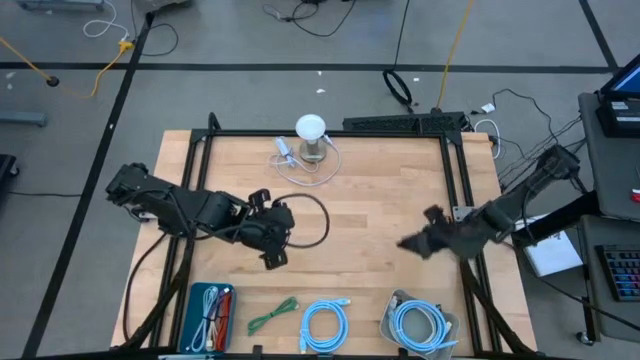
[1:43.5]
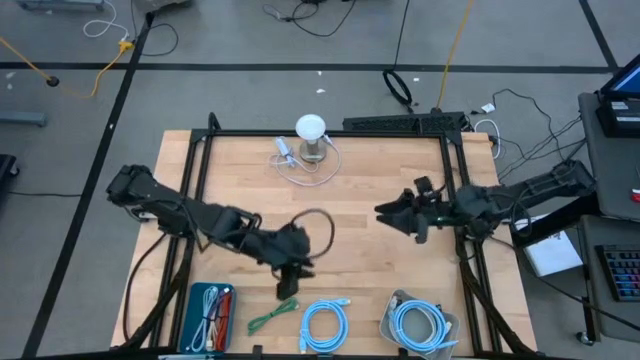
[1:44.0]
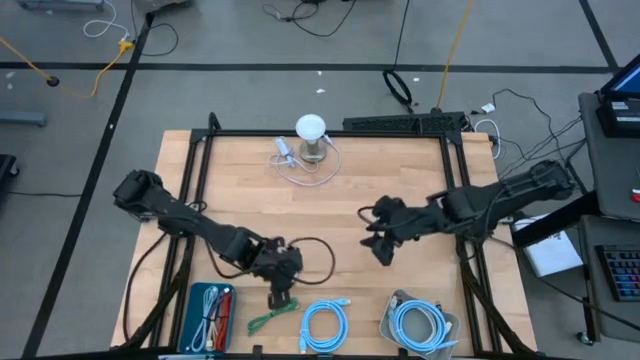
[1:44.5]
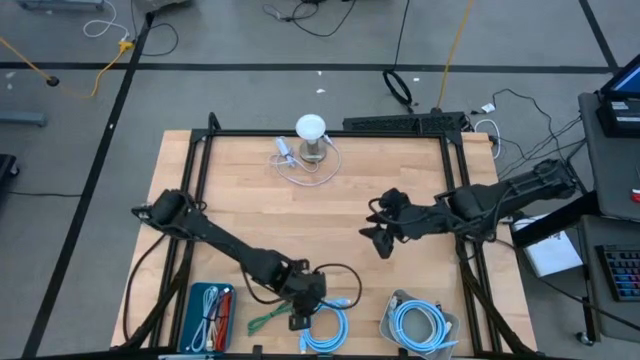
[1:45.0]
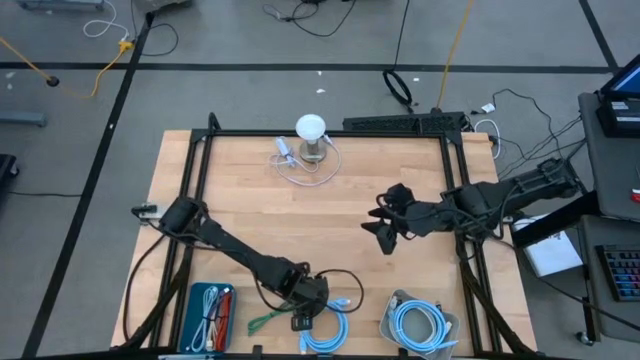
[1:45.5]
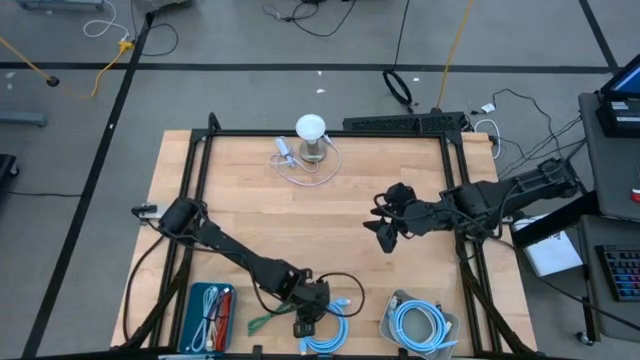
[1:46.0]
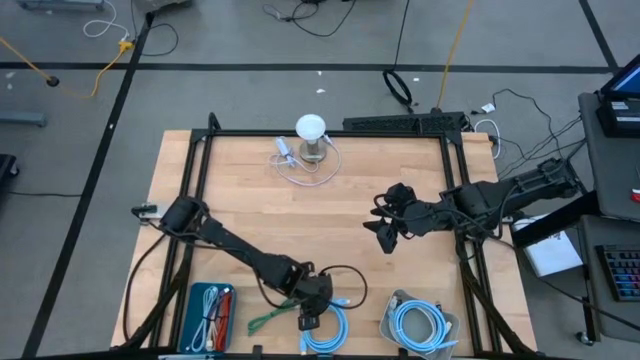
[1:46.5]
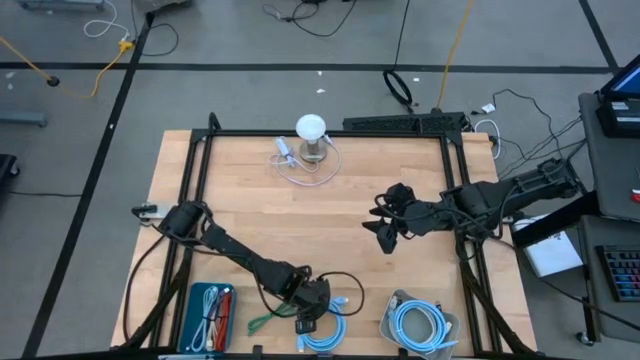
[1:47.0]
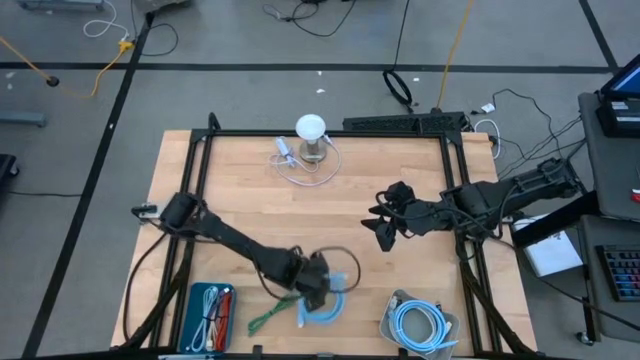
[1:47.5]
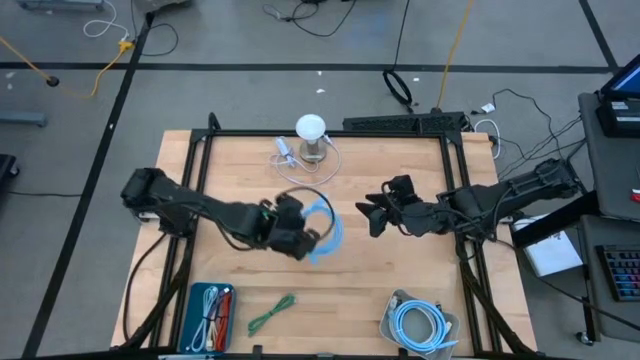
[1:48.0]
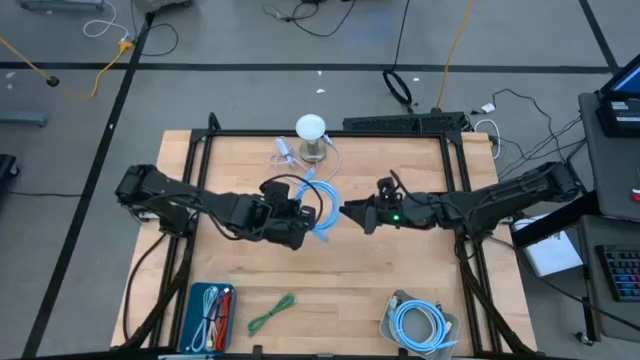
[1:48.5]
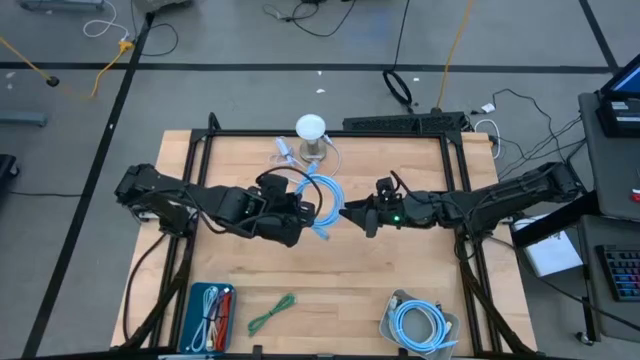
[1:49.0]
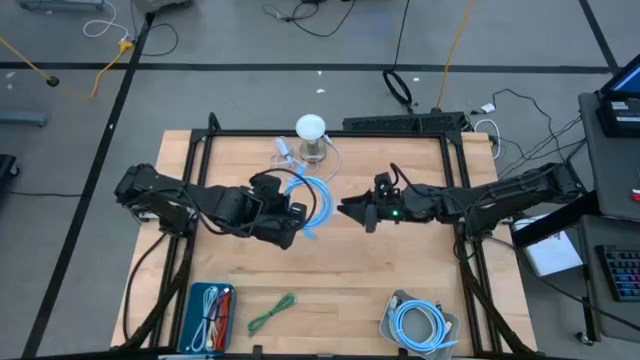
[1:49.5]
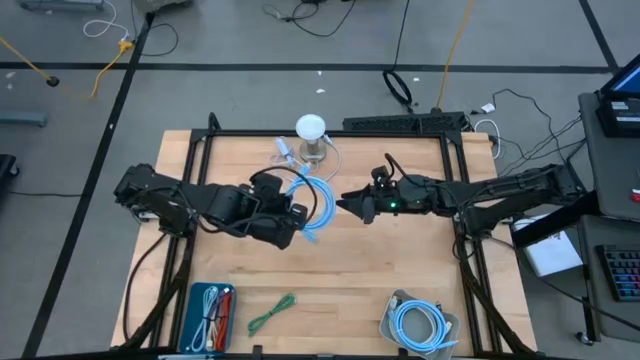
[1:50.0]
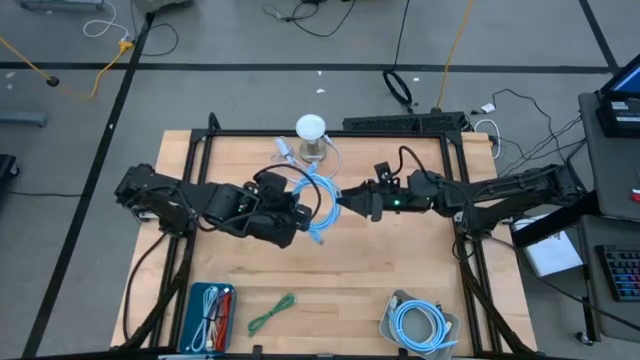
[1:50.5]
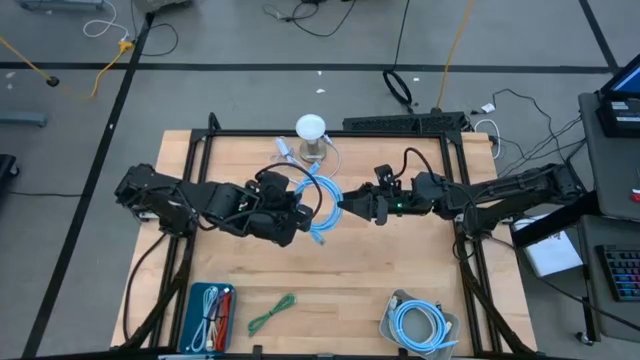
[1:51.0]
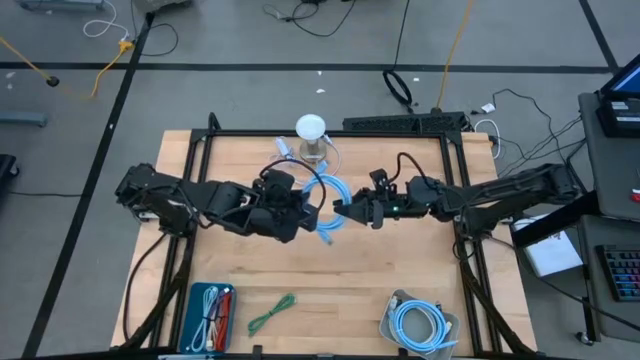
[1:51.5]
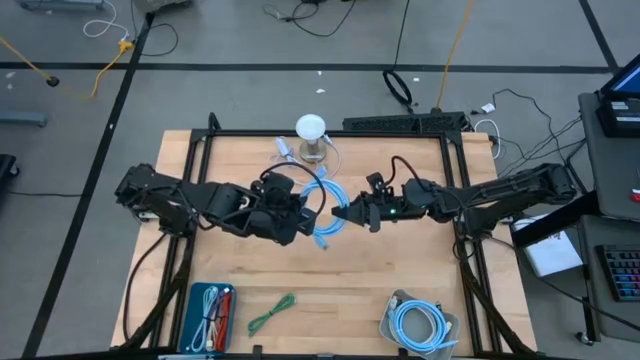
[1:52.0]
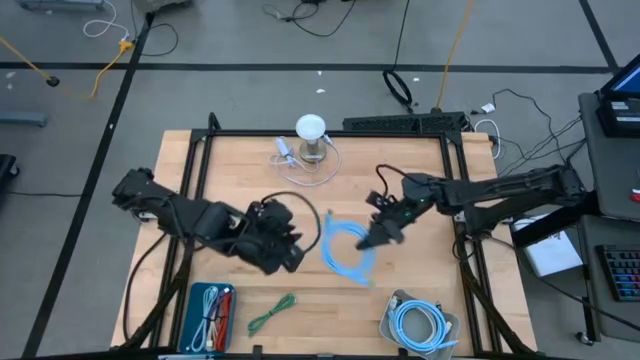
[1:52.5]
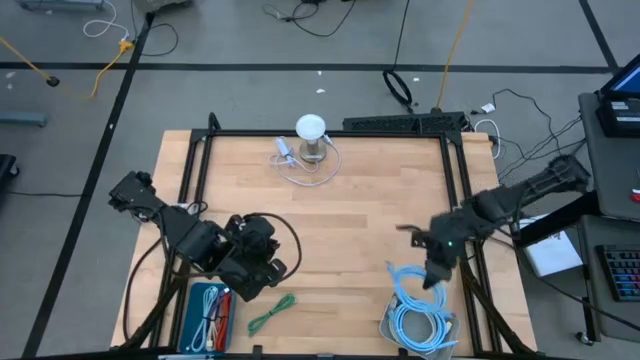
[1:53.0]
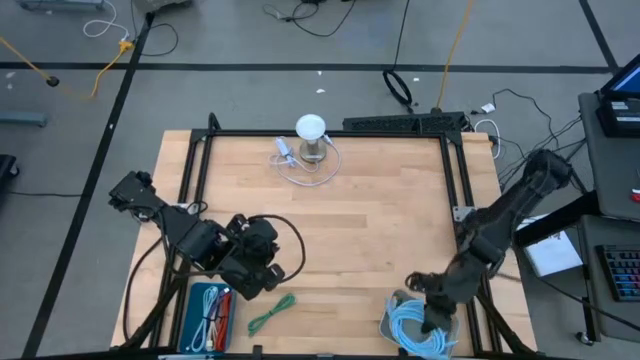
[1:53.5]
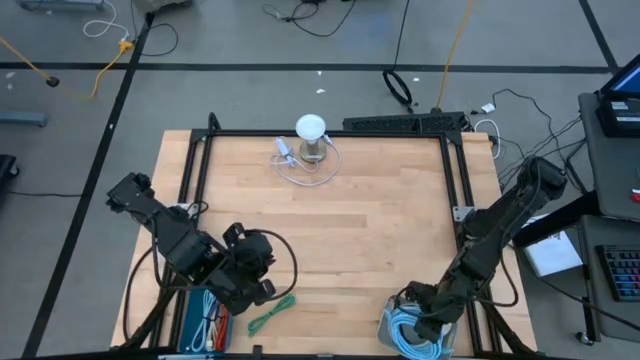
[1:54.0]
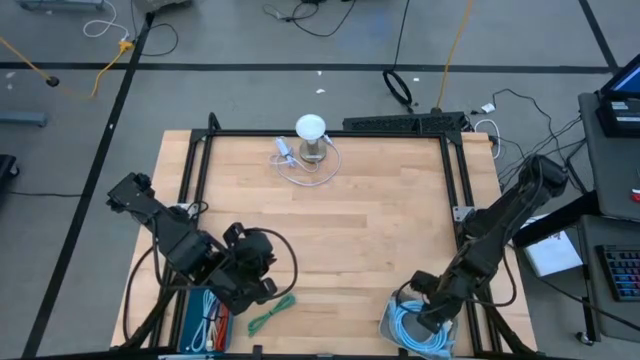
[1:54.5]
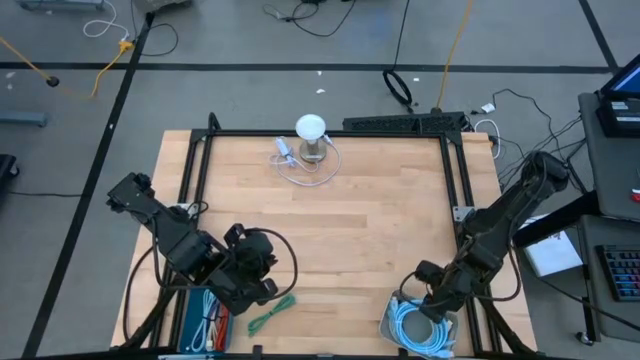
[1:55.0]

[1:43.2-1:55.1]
Task: Pick & Place USB Port
Put the blue video cable into the gray bin

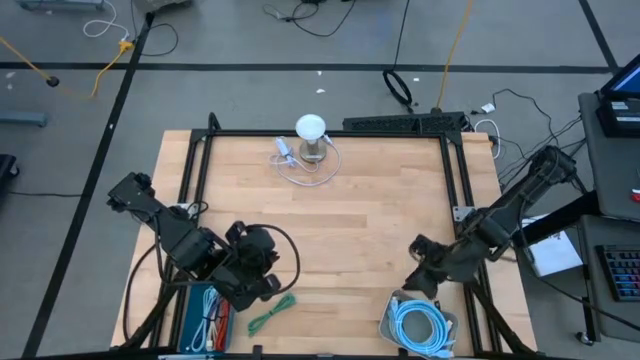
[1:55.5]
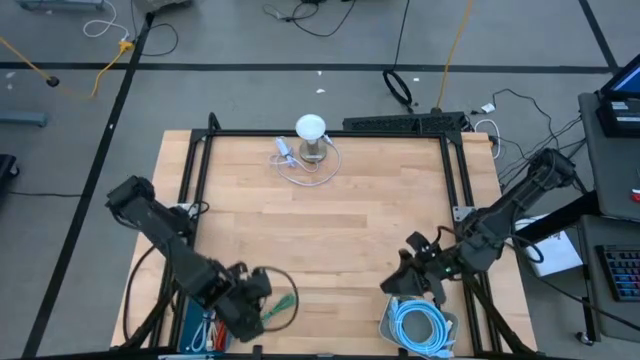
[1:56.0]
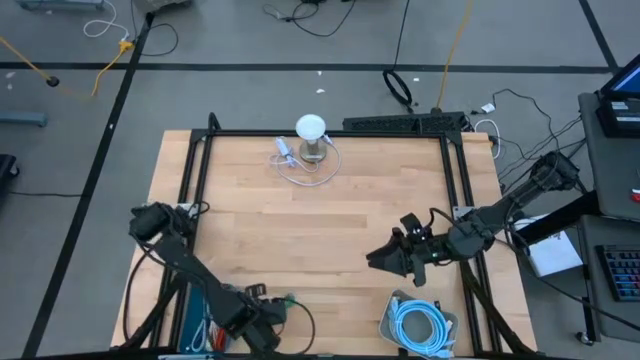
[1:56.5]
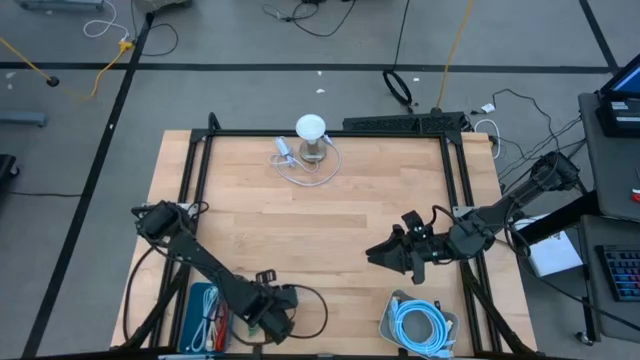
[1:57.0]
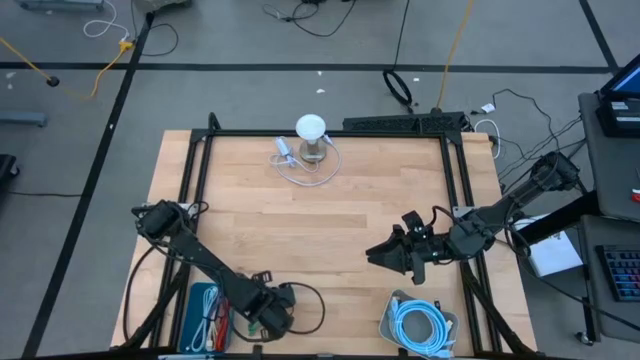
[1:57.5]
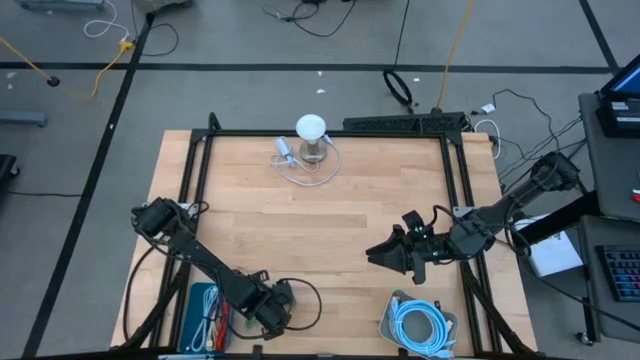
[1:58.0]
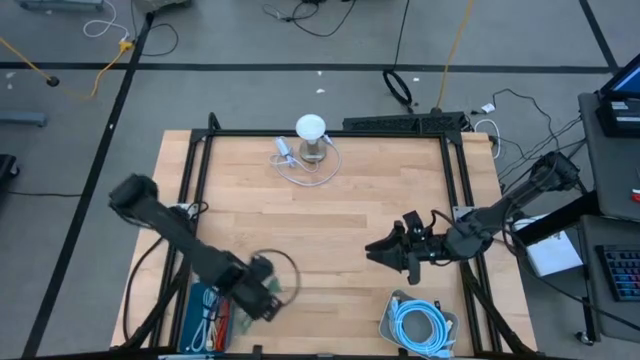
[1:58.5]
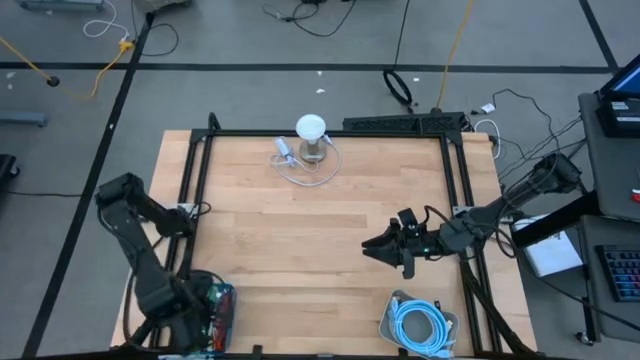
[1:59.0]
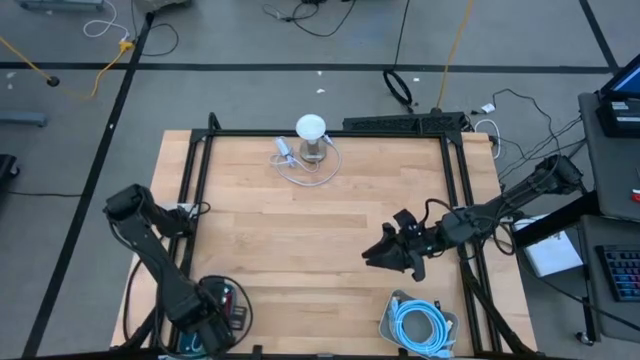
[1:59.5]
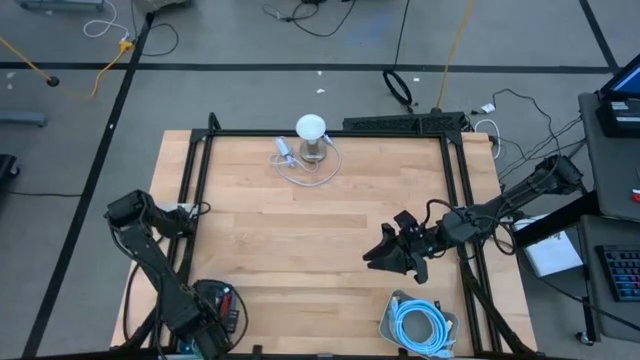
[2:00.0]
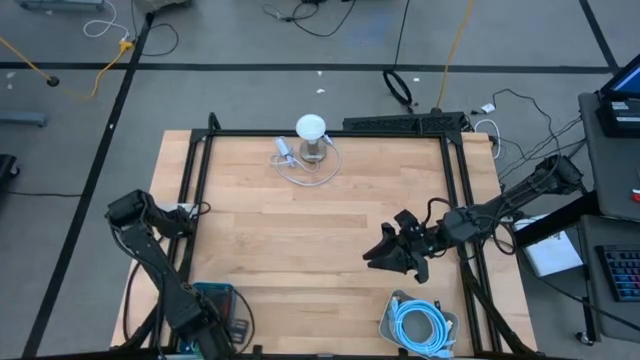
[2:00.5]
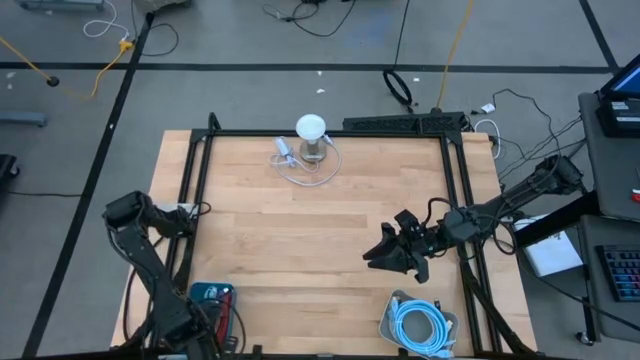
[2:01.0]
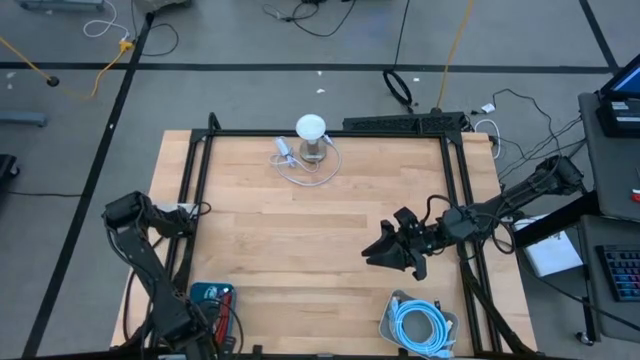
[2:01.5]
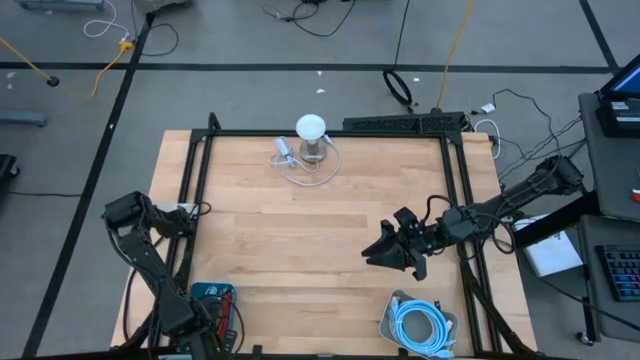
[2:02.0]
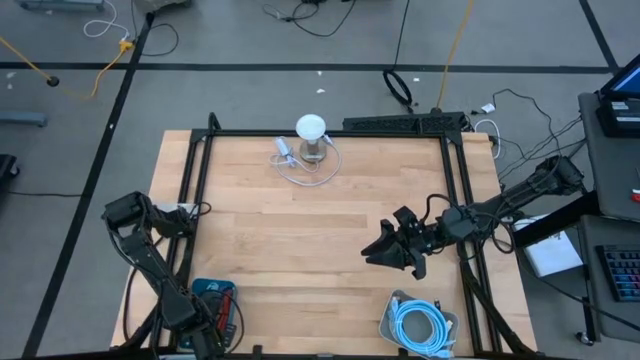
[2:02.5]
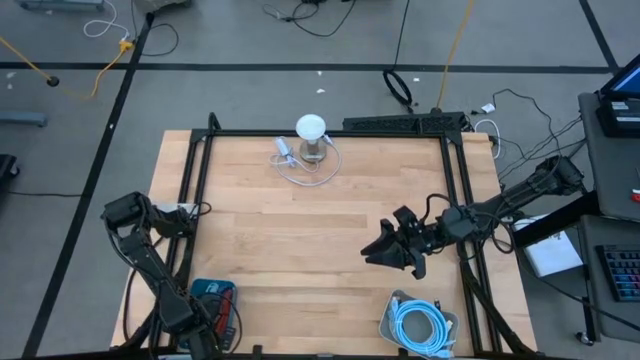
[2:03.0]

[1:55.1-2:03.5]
Put the green charger cable into the blue bin

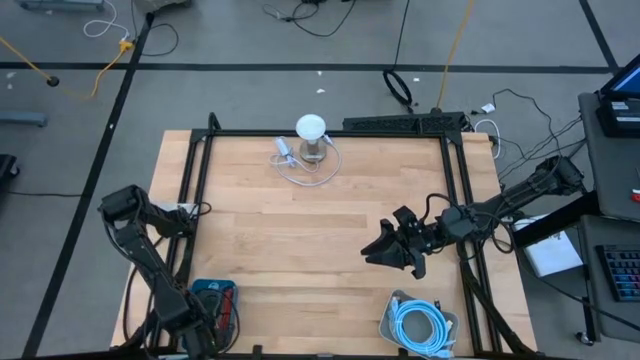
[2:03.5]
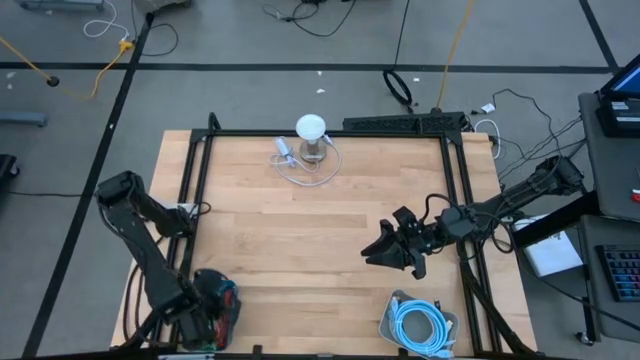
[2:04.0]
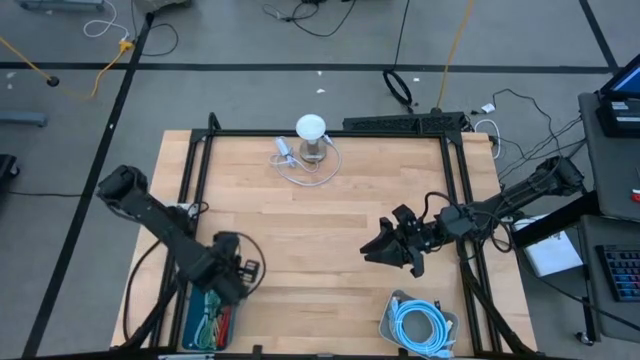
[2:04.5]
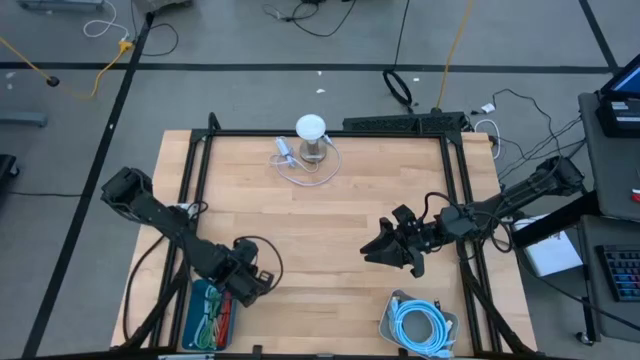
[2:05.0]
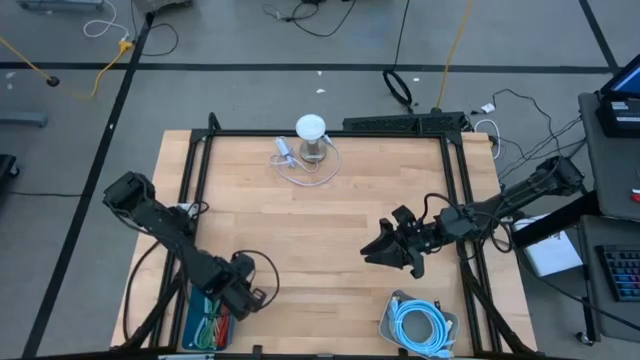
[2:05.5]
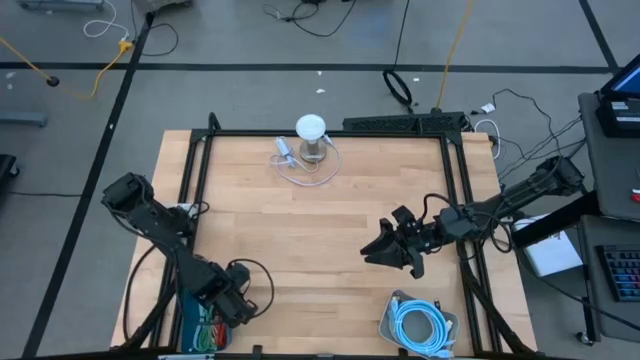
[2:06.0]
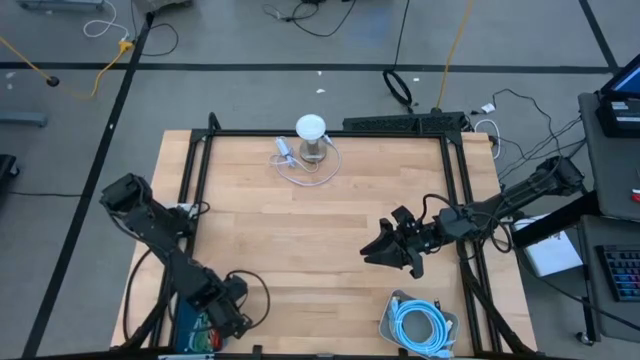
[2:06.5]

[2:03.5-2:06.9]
Adjust the blue bin
